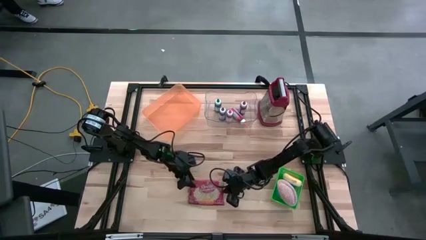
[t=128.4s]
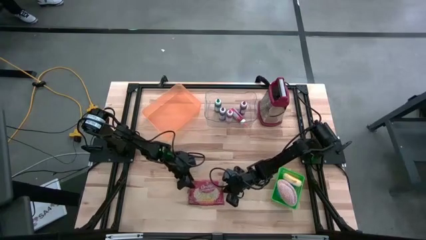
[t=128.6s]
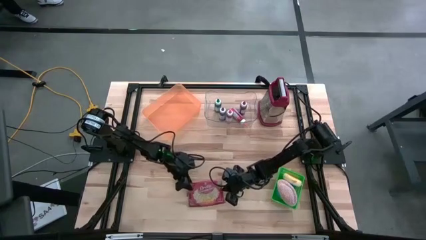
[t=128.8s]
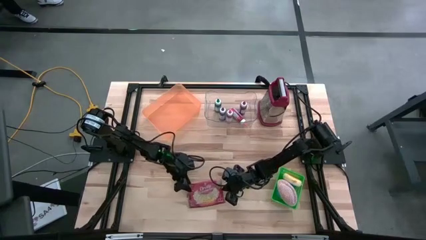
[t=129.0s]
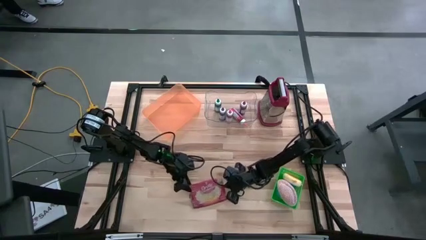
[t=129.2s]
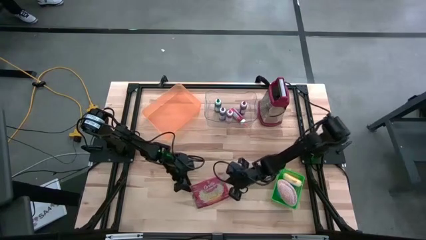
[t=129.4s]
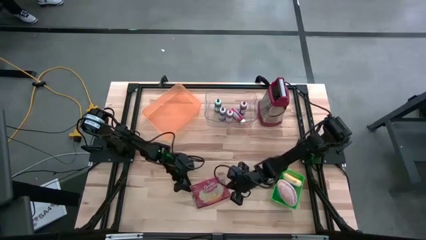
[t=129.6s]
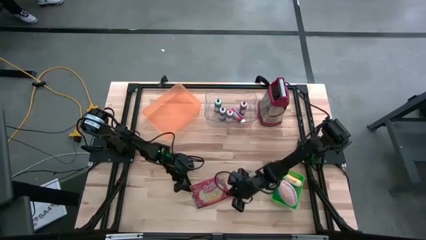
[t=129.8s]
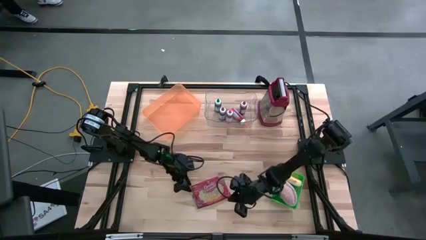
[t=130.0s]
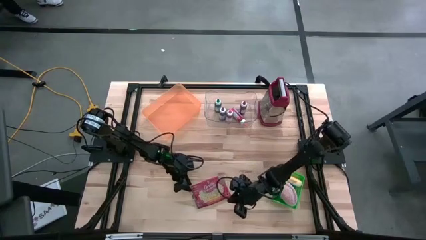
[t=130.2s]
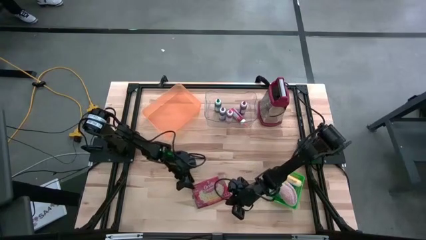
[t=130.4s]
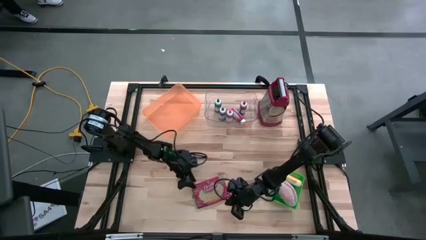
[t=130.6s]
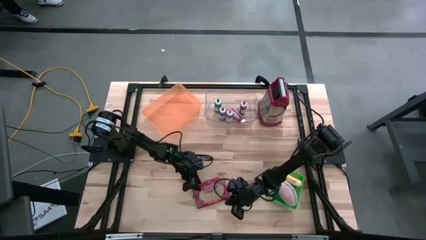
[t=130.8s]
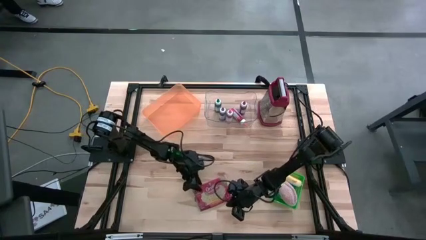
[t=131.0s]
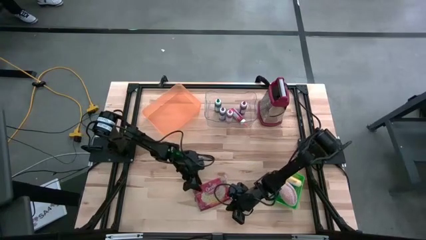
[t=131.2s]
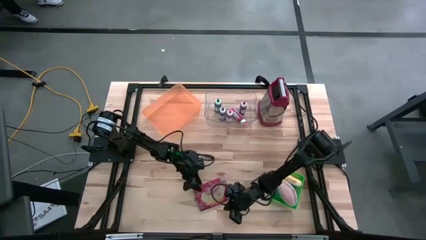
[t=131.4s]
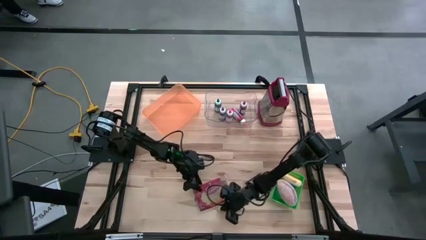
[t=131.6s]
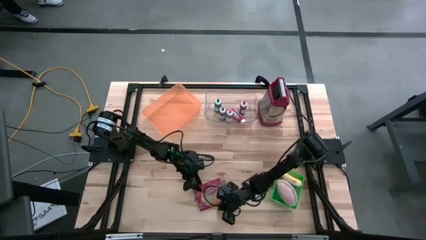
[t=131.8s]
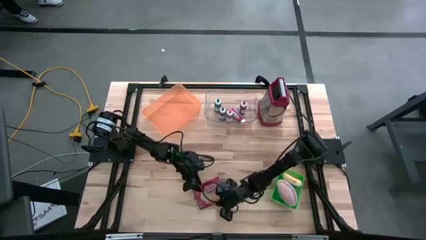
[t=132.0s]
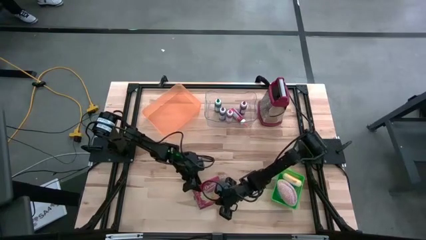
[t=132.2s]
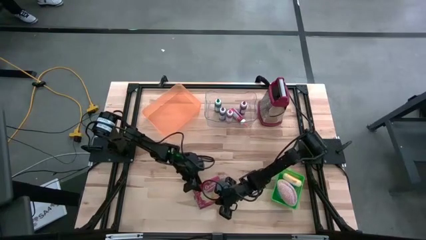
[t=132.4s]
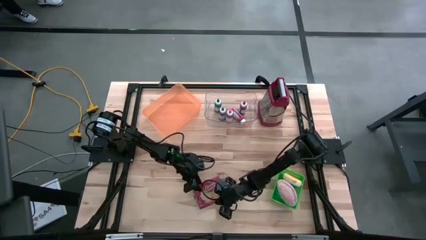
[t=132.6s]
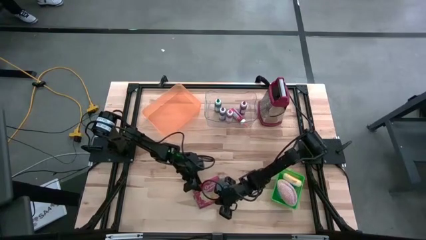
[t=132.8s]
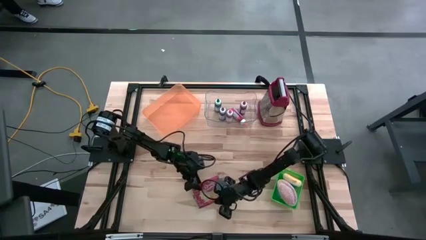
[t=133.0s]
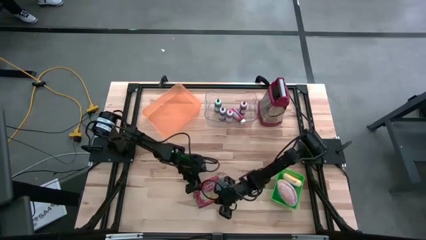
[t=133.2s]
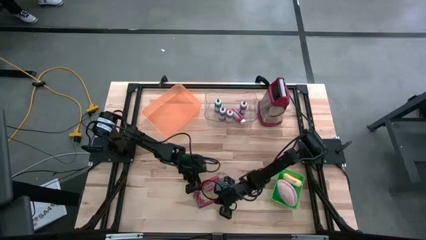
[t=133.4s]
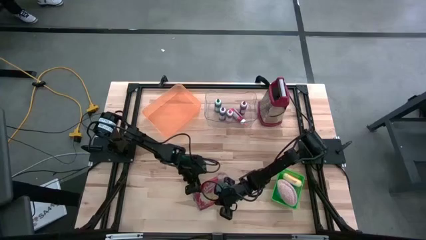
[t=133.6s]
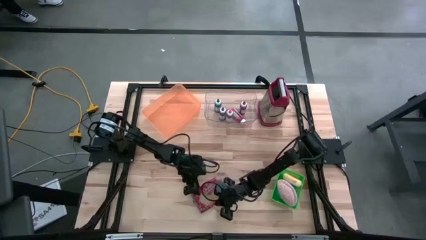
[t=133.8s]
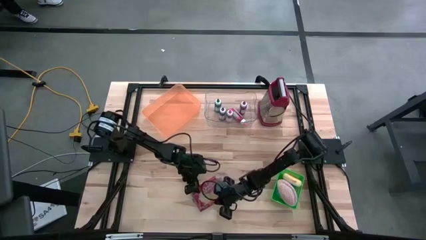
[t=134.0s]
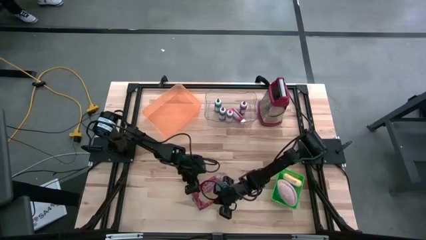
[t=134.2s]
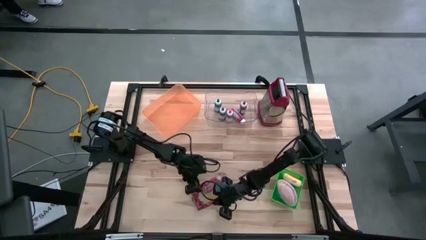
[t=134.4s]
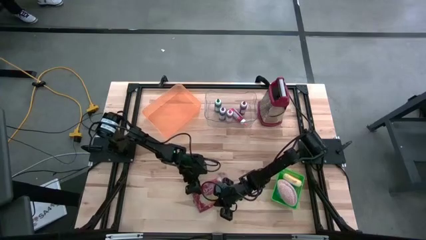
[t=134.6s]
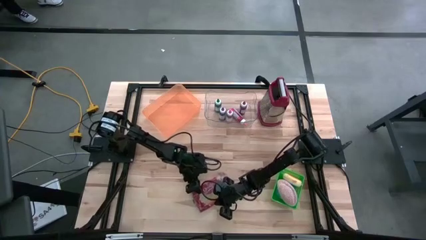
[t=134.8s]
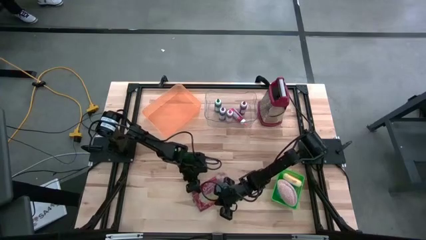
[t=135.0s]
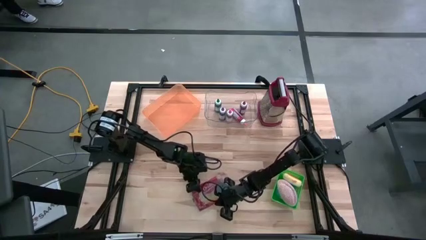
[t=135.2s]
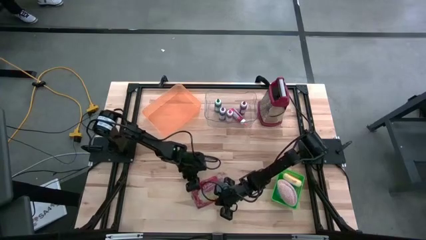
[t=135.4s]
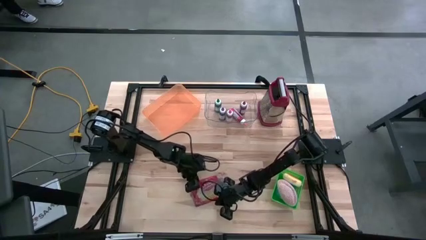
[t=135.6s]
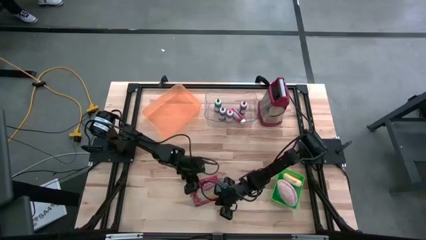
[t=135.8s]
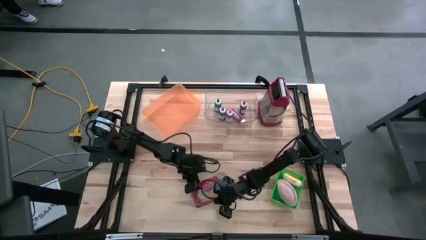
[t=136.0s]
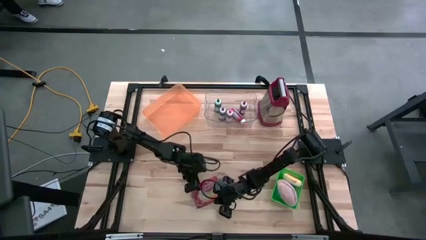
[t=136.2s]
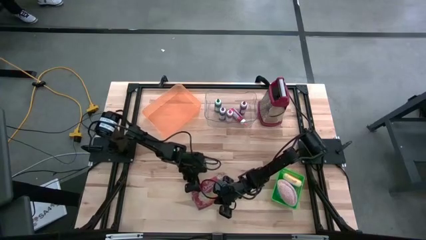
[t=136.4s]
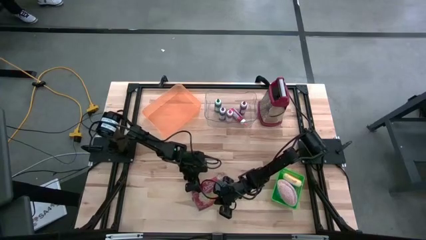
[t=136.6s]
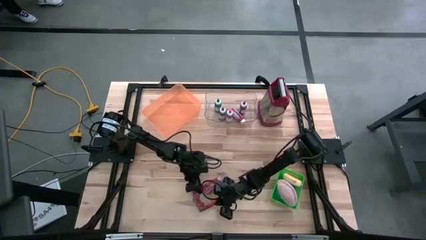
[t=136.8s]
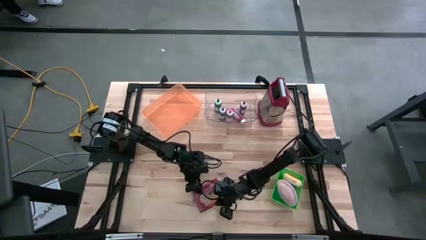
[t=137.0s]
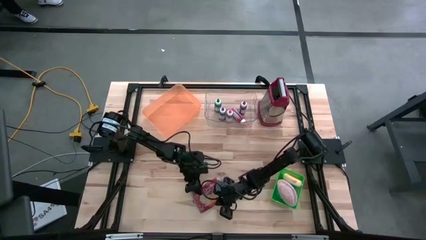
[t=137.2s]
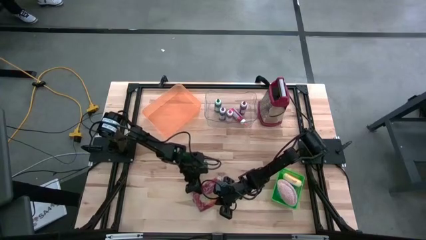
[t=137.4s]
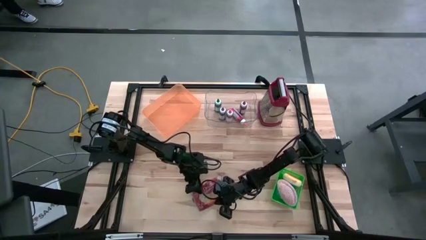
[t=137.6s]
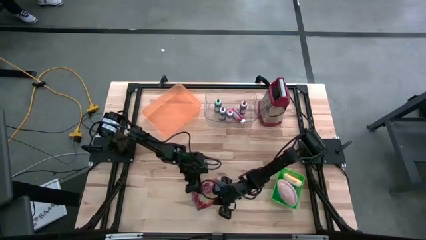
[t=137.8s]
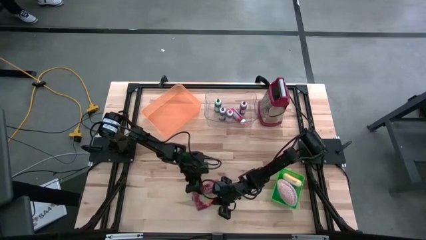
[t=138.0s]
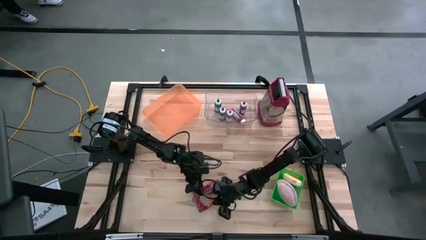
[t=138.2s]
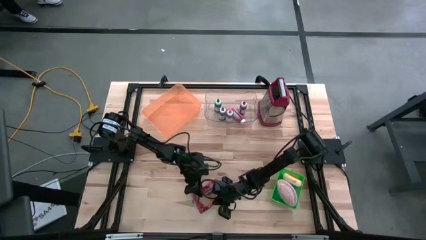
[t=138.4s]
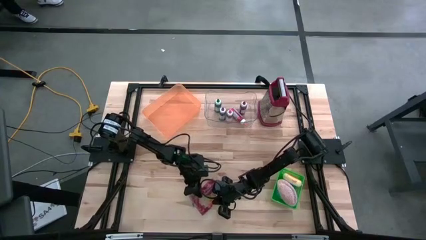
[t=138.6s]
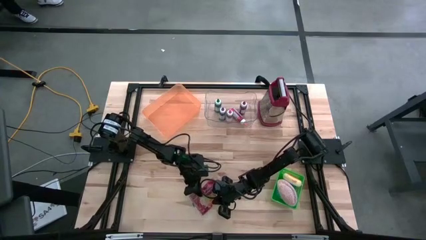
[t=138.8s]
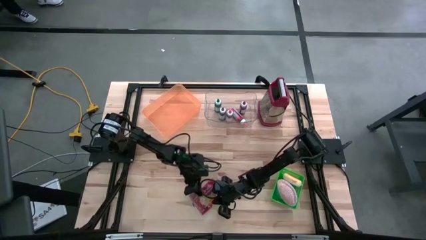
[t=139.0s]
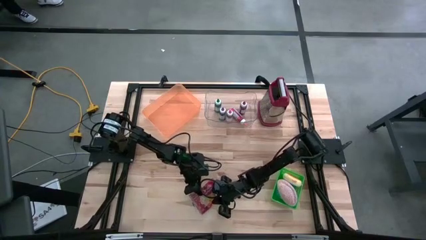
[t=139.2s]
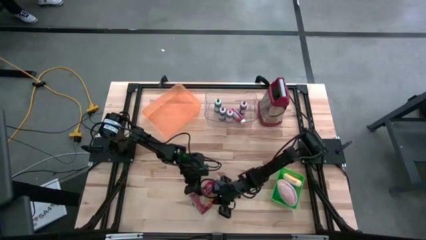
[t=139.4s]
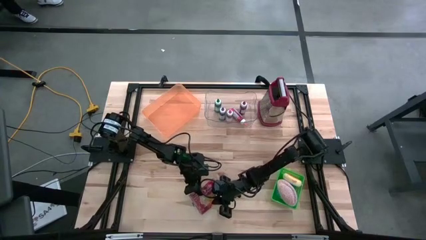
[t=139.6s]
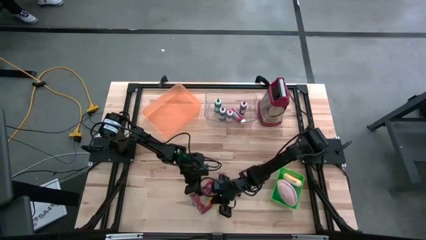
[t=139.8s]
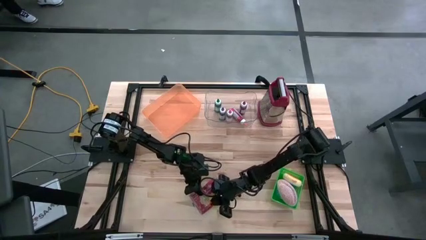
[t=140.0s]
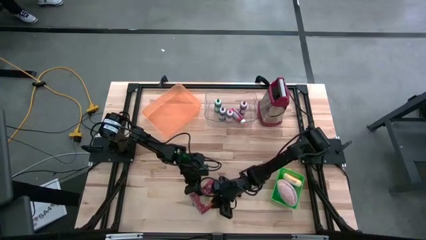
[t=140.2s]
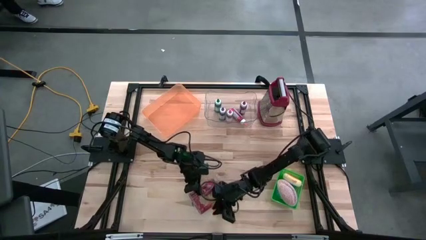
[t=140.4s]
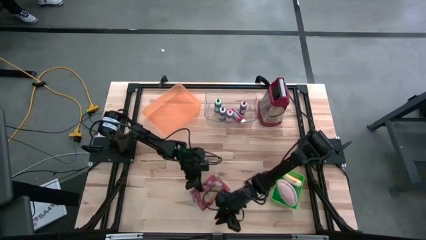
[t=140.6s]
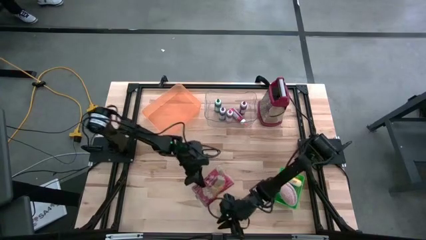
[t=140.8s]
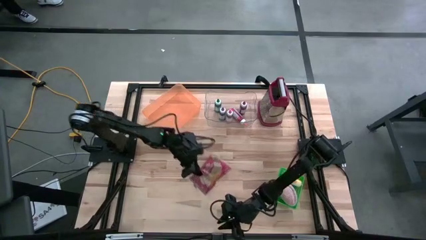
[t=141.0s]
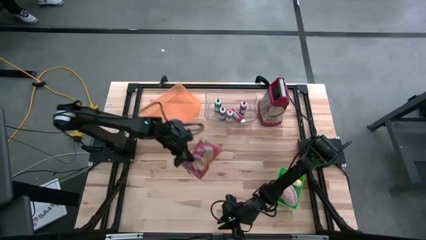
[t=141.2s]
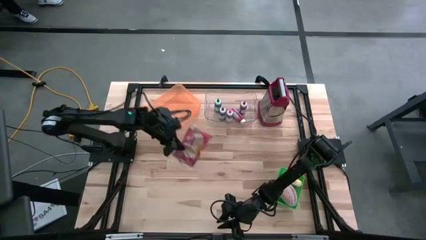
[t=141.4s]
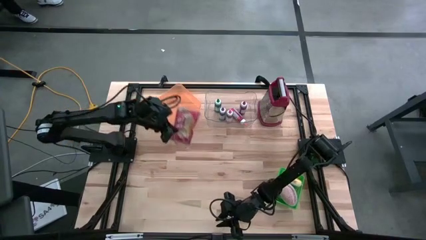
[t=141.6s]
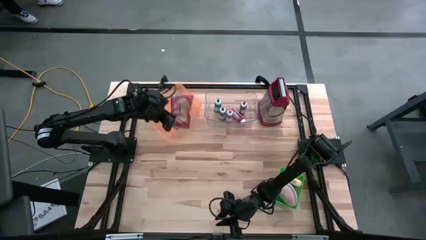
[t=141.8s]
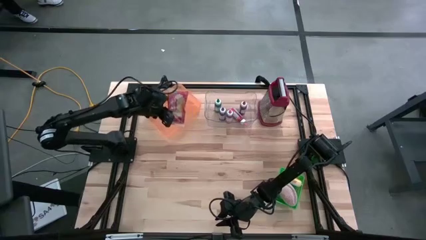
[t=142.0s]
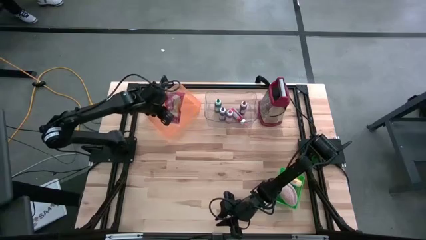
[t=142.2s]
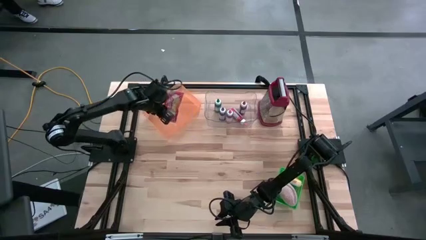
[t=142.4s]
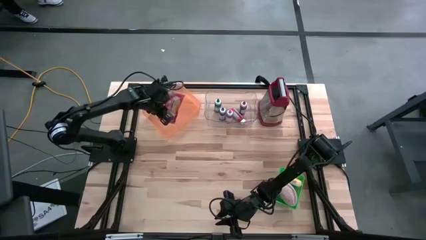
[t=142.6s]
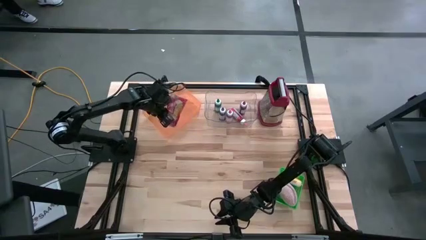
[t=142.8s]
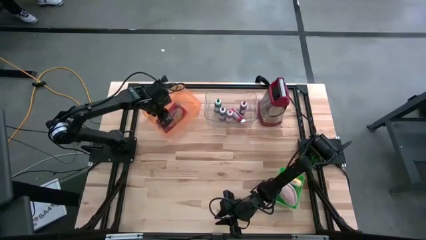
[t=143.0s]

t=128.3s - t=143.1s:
Put the red popcorn bag into the orange bin
